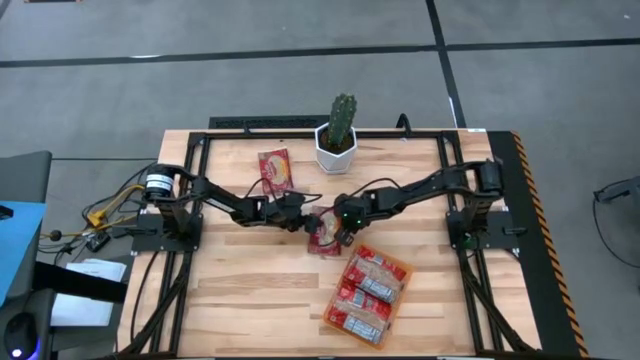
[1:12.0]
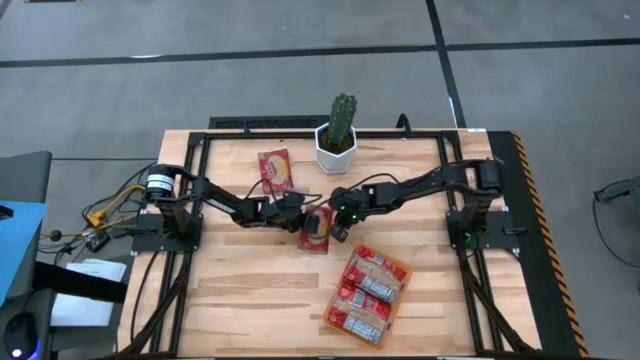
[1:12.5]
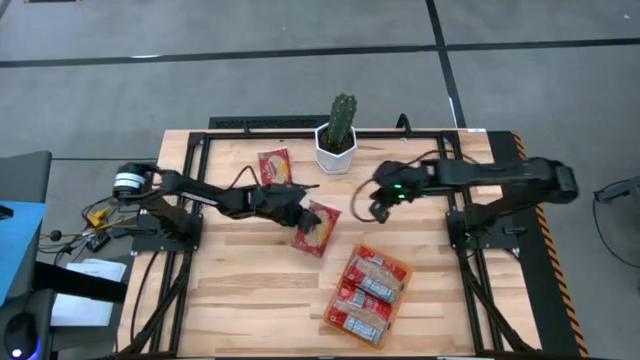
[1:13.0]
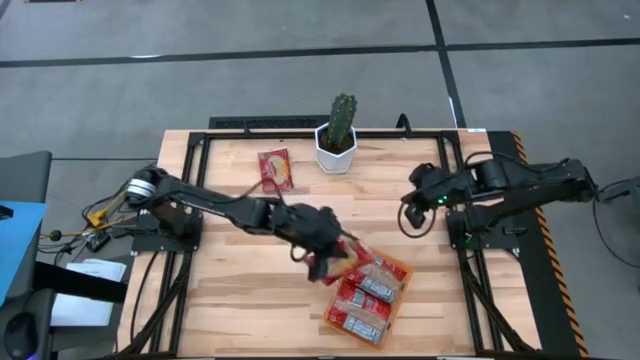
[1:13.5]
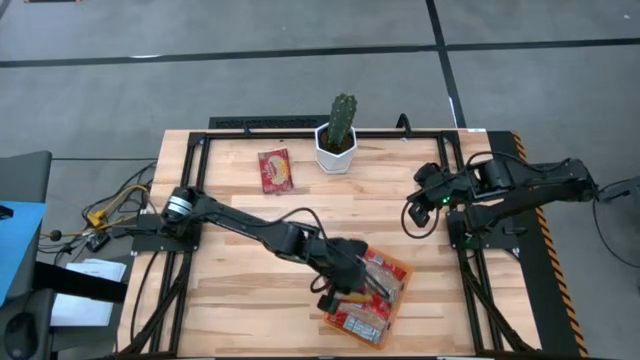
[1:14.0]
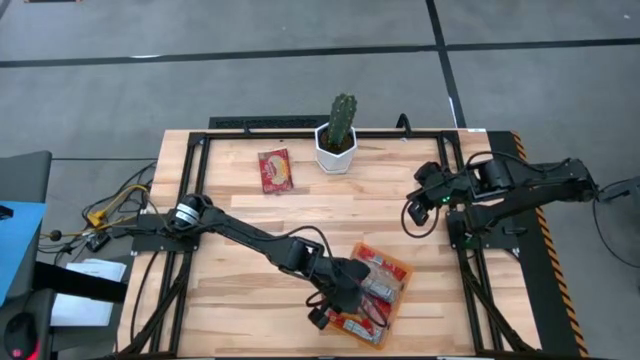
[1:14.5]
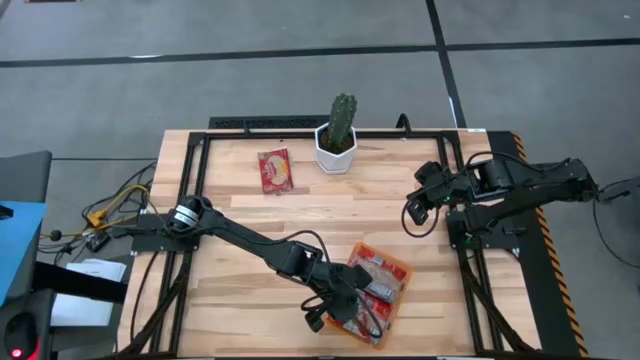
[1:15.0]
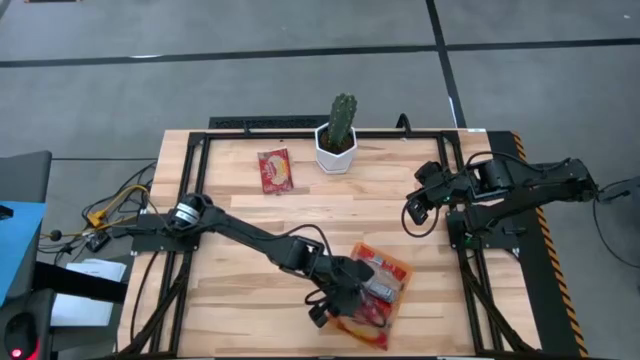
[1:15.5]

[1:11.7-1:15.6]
Task: Sort popcorn bags into baskets
Put the red popcorn bag into the orange container

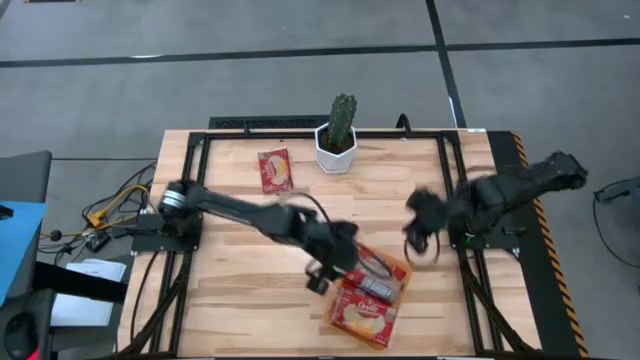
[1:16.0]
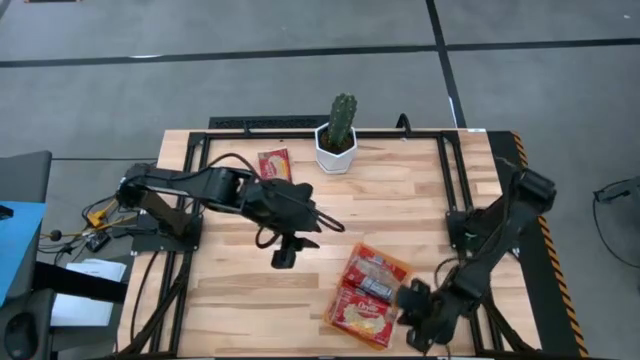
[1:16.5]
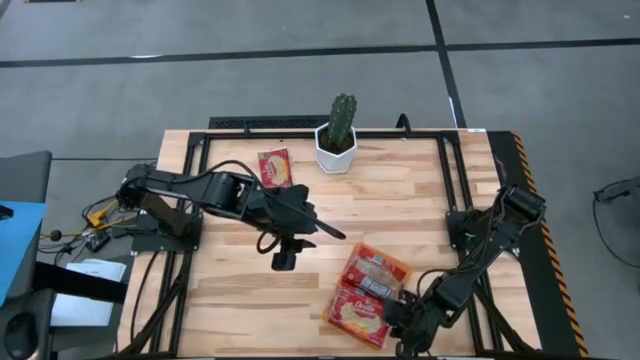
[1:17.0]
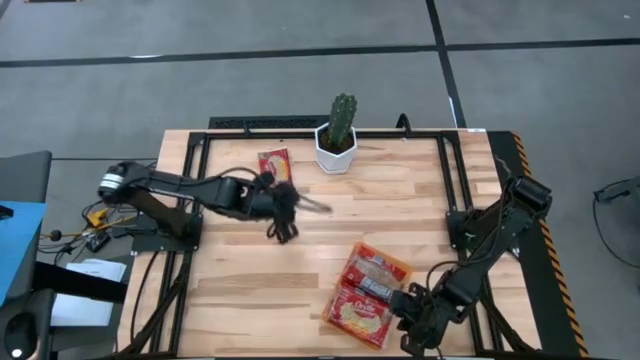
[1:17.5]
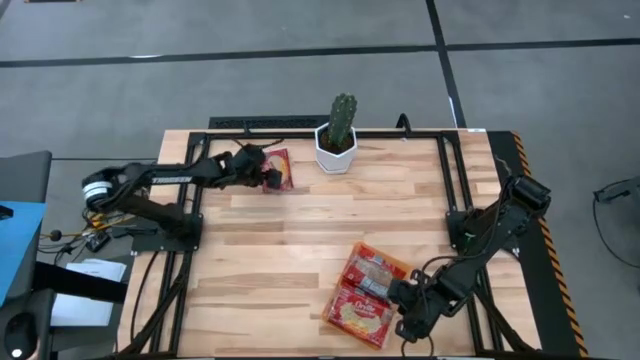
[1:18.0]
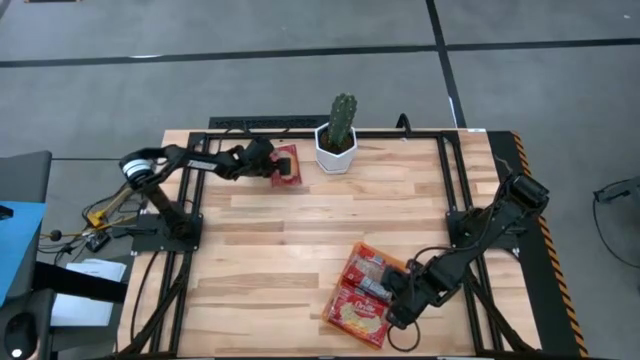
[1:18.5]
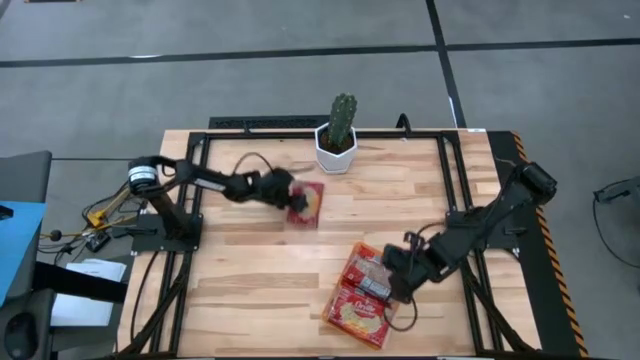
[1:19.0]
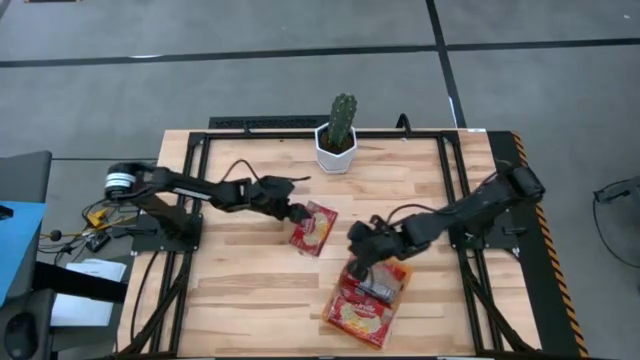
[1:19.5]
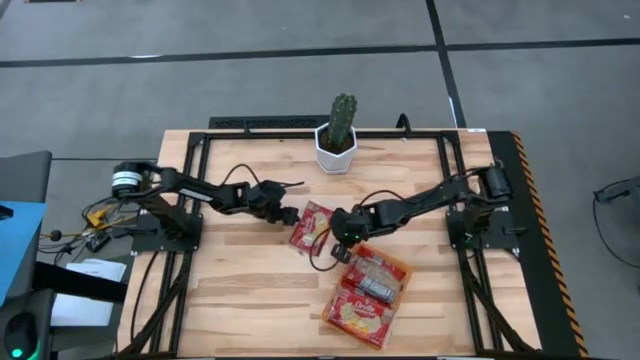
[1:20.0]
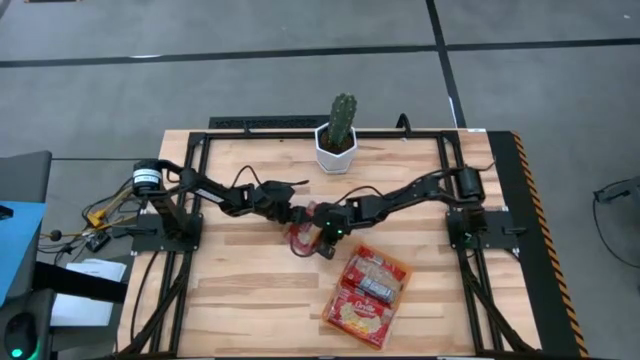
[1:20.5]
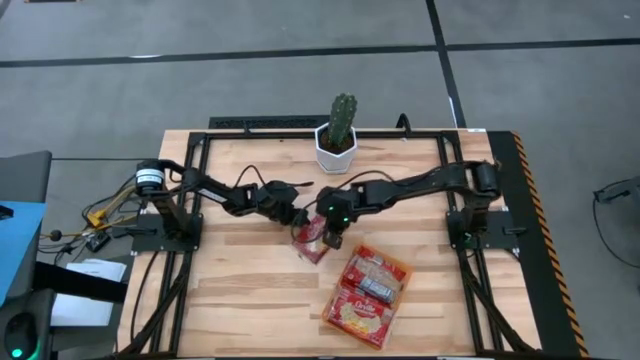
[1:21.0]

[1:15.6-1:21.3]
Put the red popcorn bag into the orange container

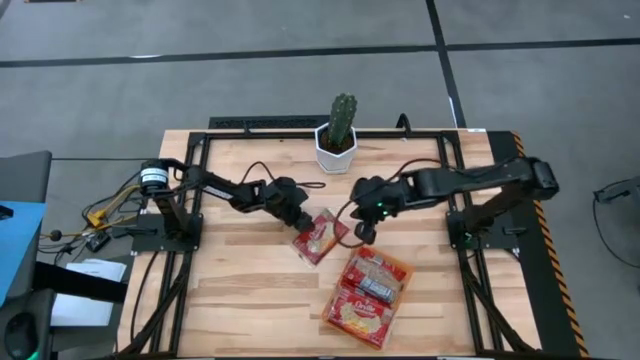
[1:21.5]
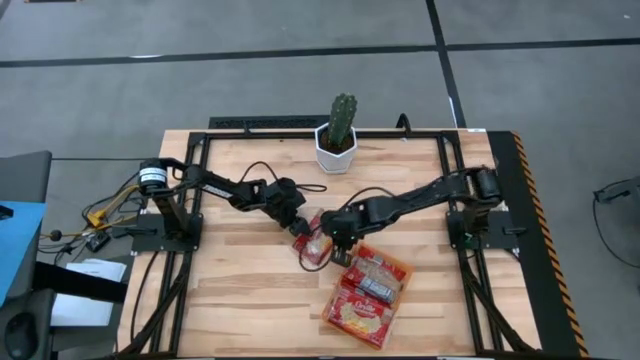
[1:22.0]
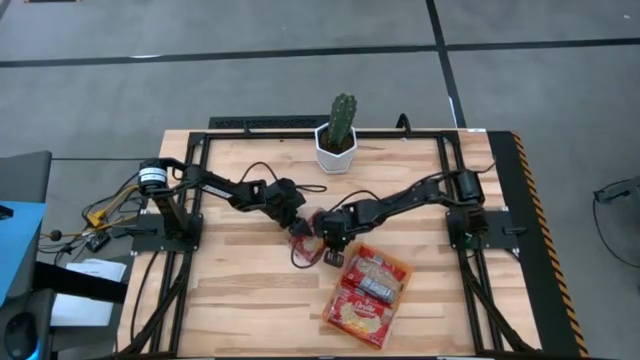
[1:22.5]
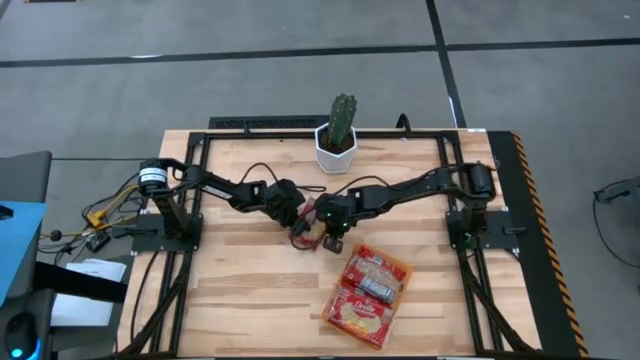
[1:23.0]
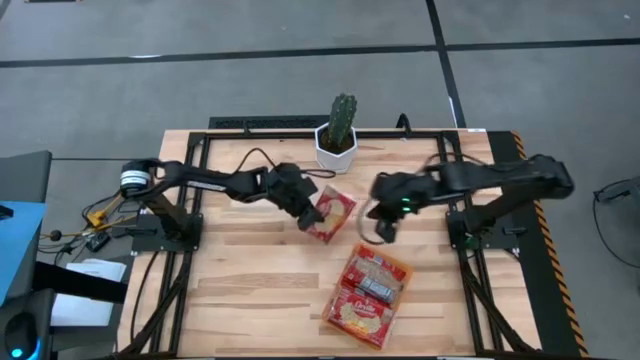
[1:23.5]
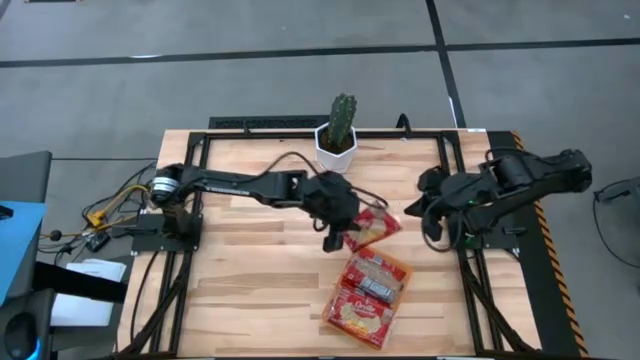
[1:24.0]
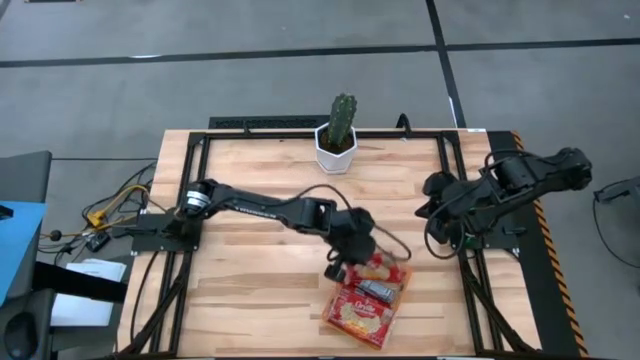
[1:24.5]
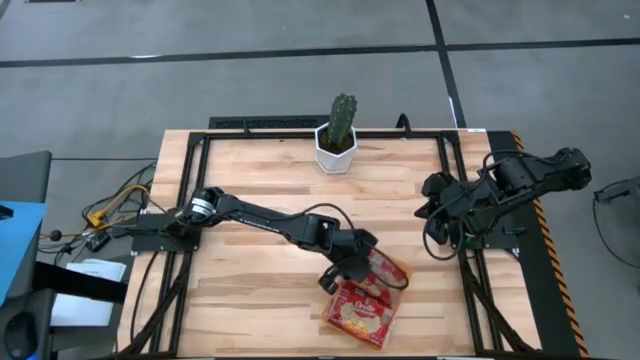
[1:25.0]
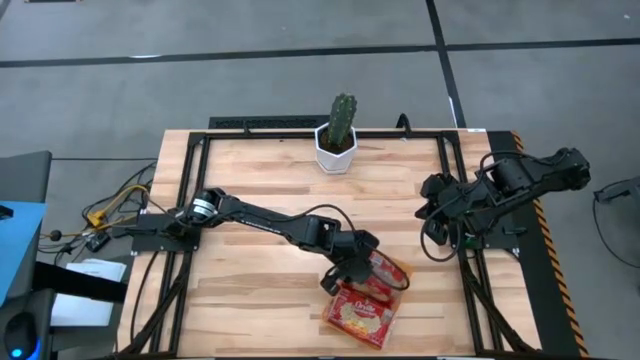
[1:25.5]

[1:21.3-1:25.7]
Put the red popcorn bag into the orange container

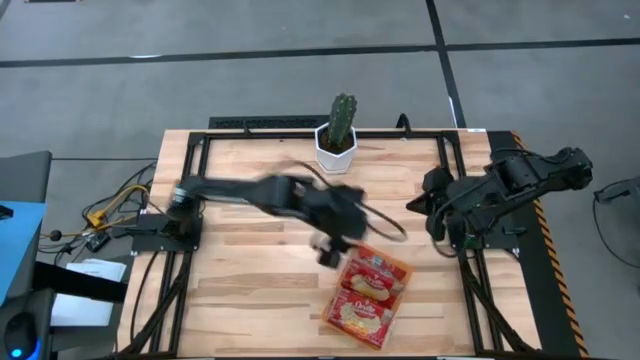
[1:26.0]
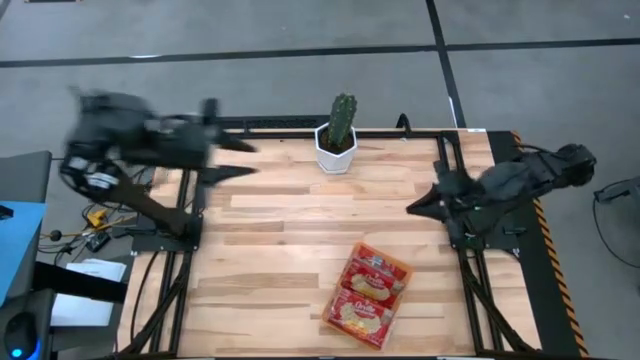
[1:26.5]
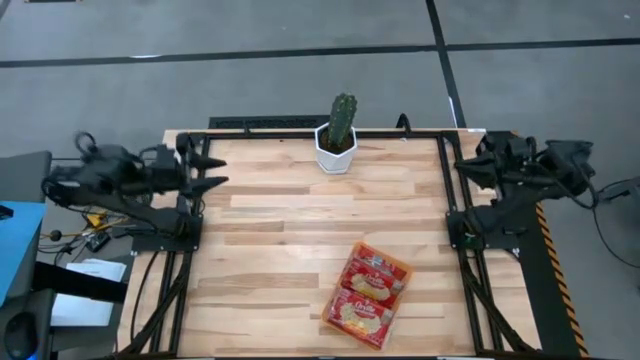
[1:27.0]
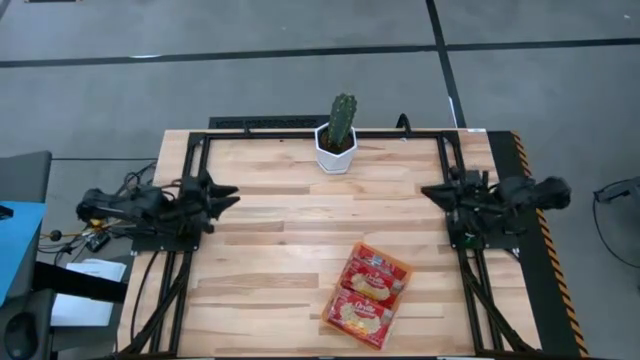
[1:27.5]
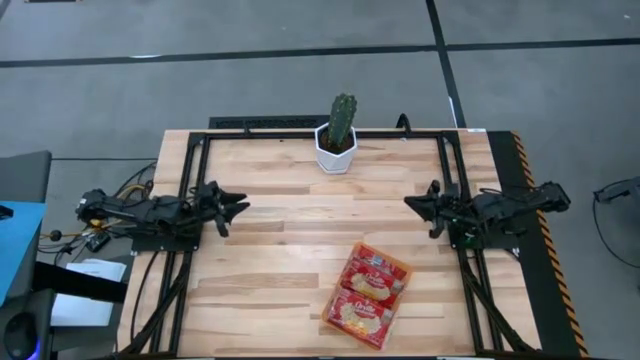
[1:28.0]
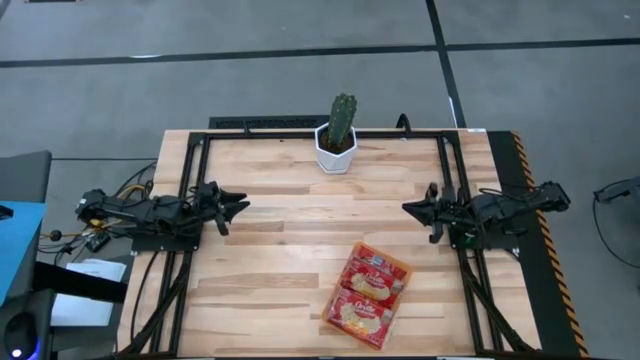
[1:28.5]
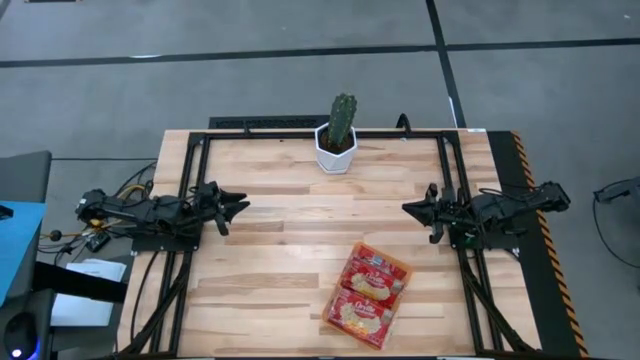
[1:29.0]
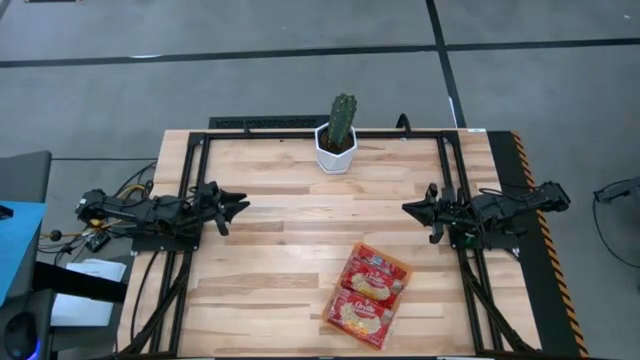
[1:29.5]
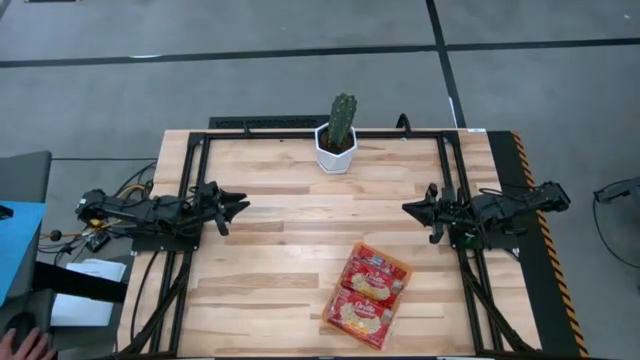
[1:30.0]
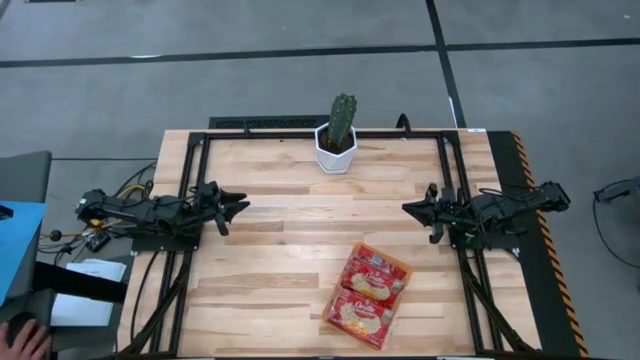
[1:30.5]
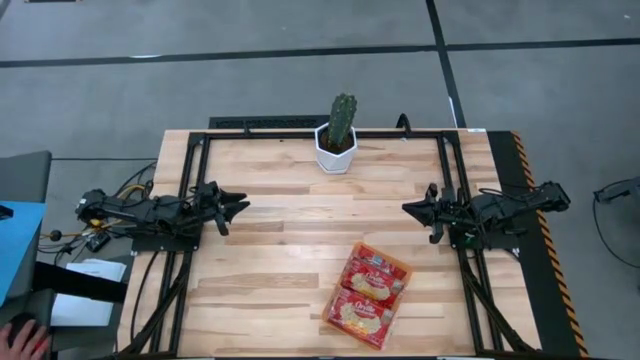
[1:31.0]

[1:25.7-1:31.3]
Return to Home Position
